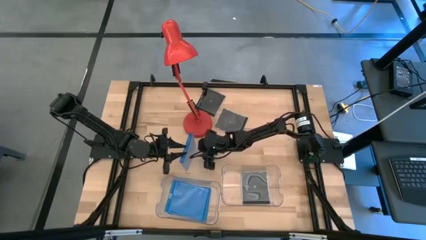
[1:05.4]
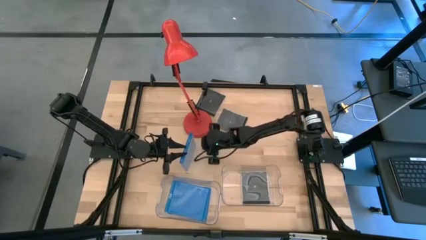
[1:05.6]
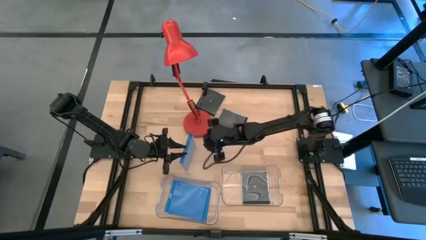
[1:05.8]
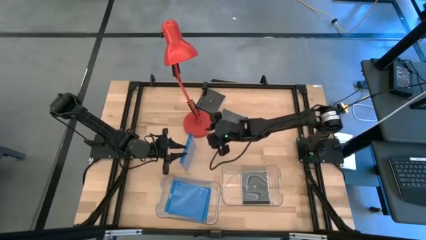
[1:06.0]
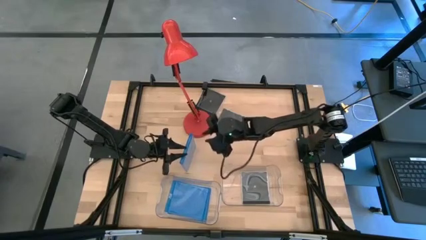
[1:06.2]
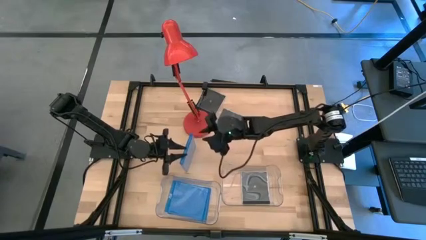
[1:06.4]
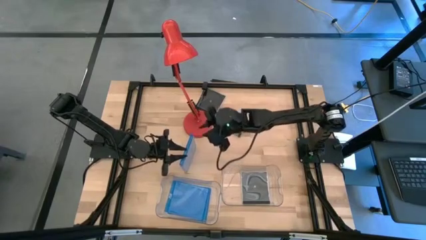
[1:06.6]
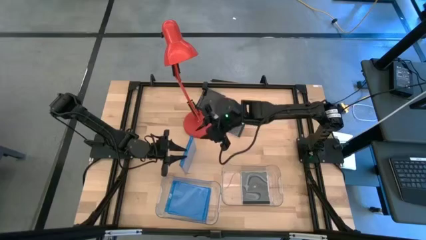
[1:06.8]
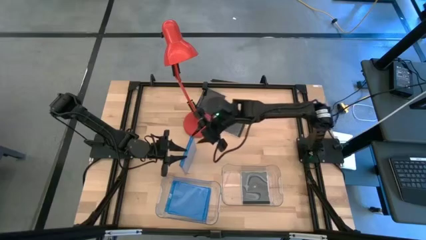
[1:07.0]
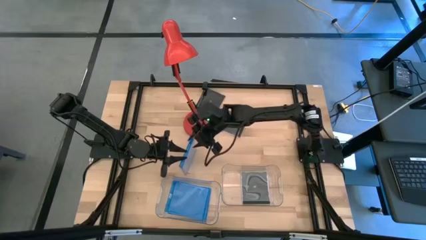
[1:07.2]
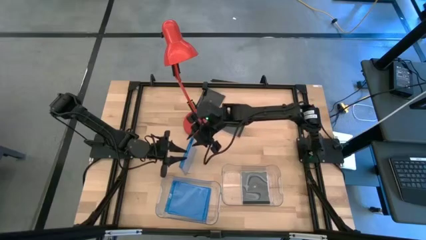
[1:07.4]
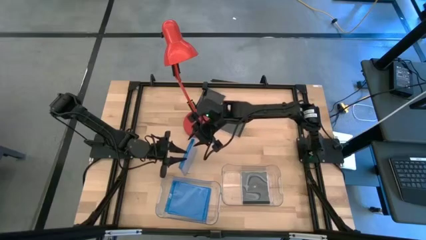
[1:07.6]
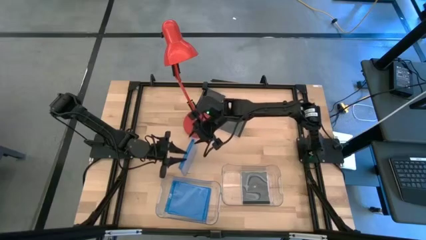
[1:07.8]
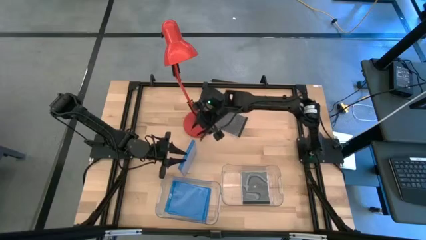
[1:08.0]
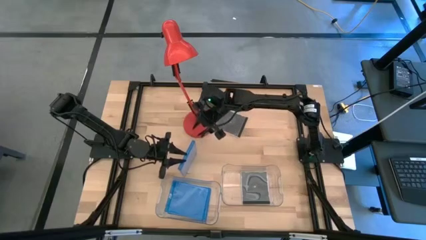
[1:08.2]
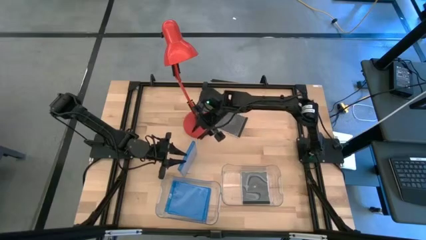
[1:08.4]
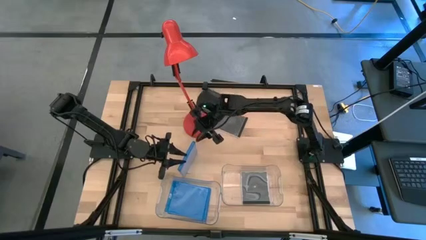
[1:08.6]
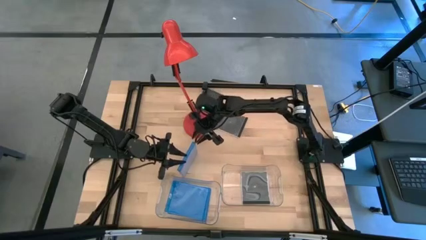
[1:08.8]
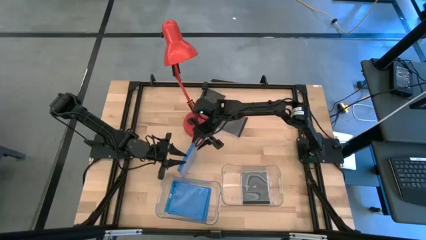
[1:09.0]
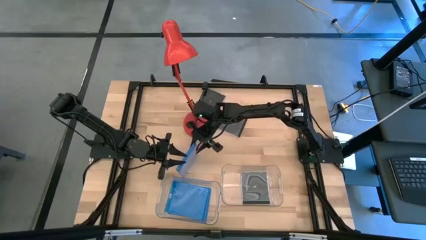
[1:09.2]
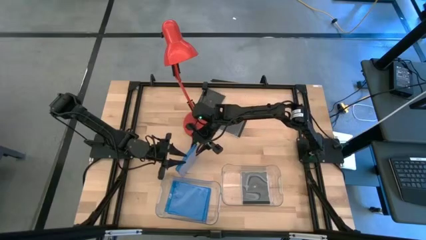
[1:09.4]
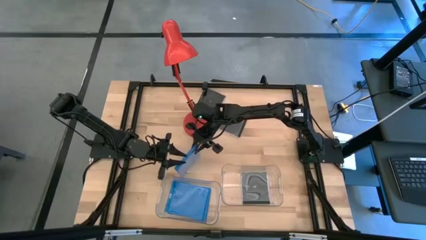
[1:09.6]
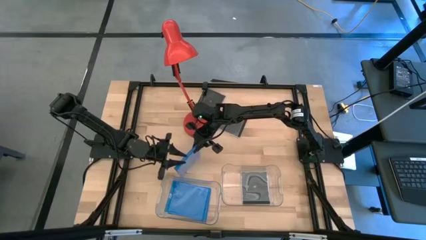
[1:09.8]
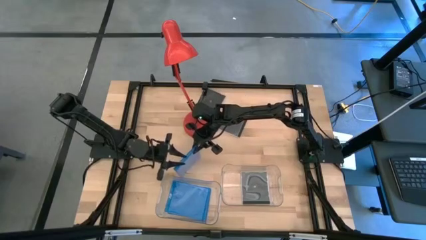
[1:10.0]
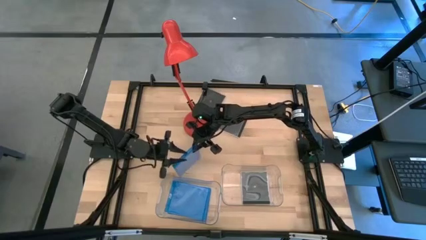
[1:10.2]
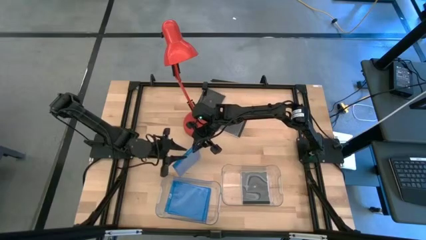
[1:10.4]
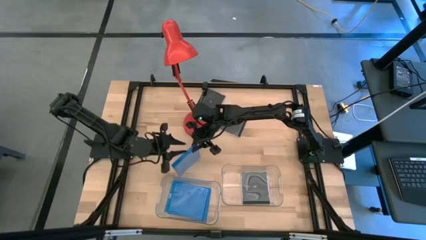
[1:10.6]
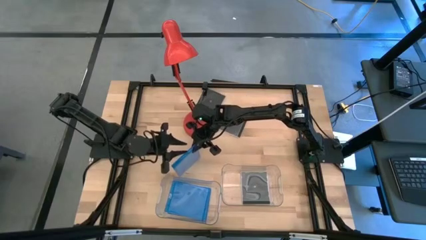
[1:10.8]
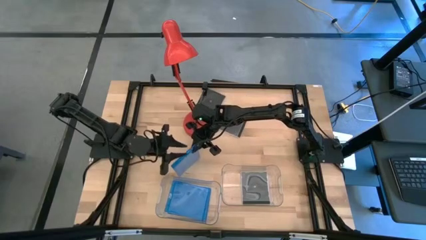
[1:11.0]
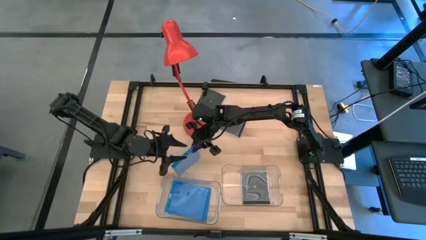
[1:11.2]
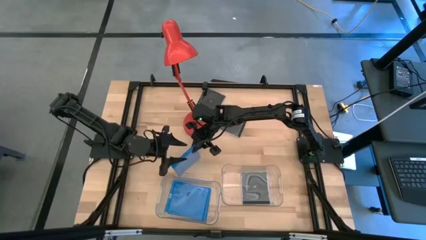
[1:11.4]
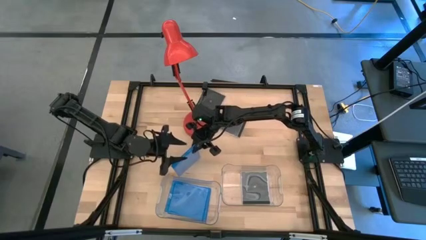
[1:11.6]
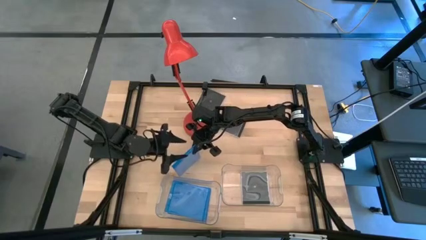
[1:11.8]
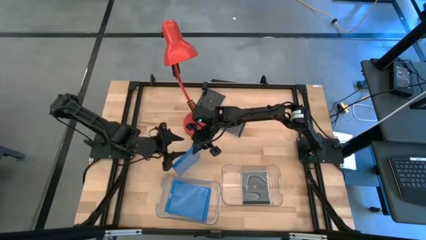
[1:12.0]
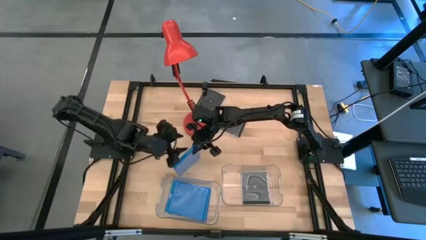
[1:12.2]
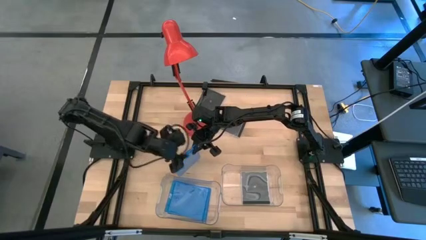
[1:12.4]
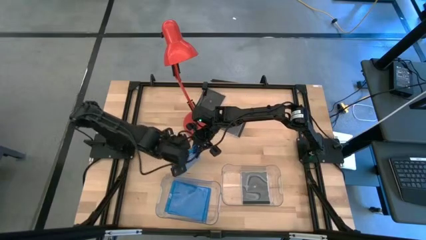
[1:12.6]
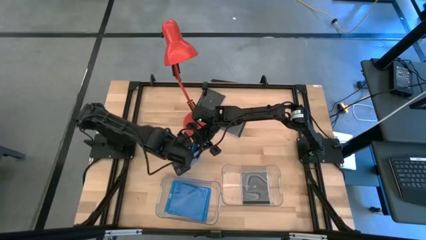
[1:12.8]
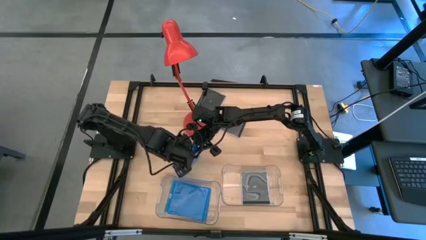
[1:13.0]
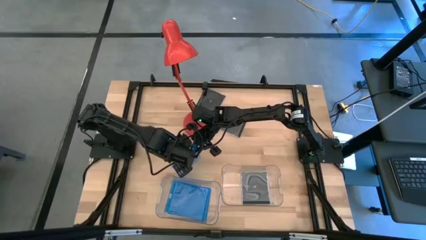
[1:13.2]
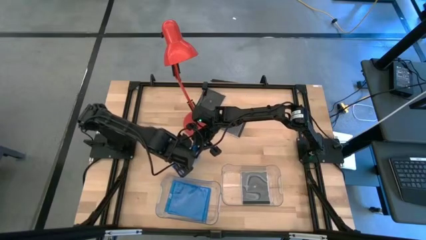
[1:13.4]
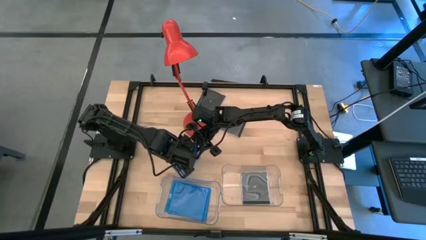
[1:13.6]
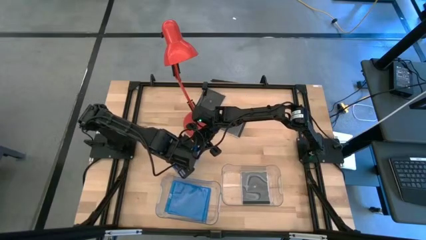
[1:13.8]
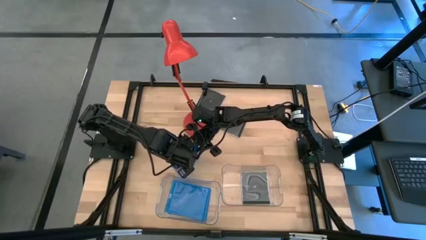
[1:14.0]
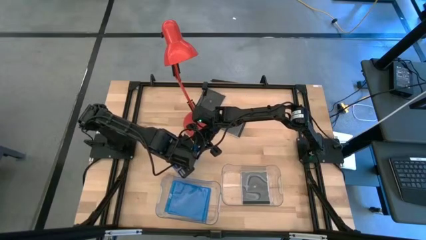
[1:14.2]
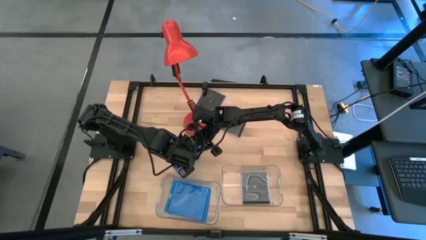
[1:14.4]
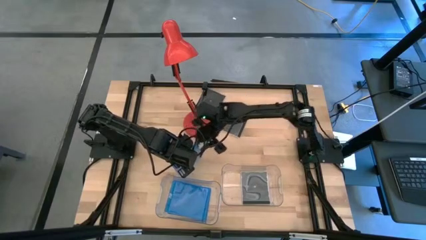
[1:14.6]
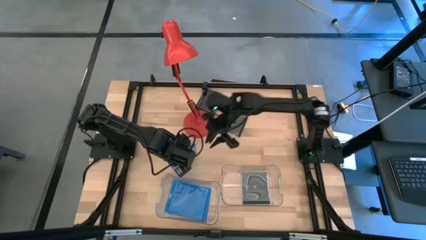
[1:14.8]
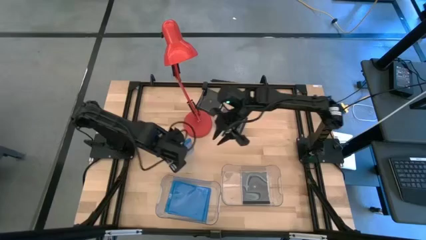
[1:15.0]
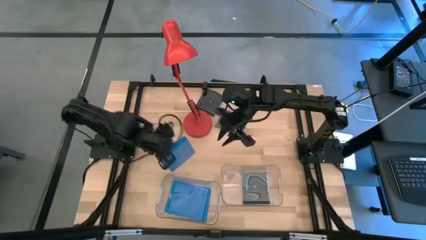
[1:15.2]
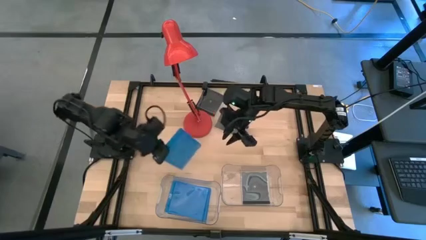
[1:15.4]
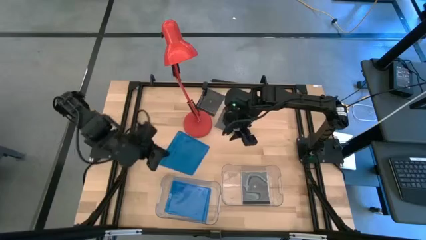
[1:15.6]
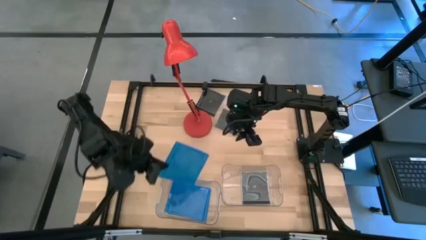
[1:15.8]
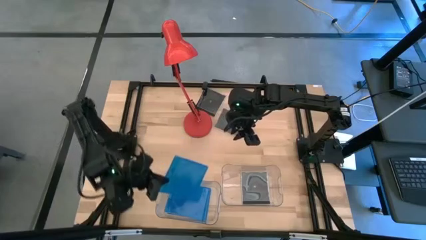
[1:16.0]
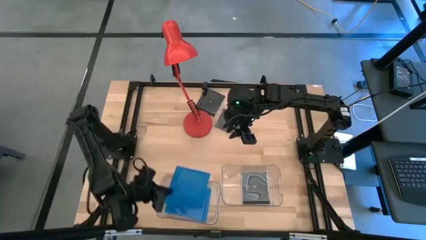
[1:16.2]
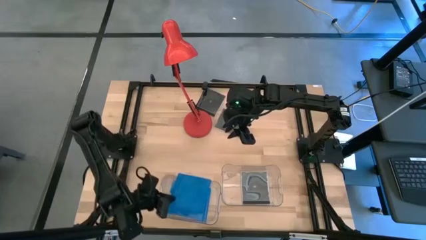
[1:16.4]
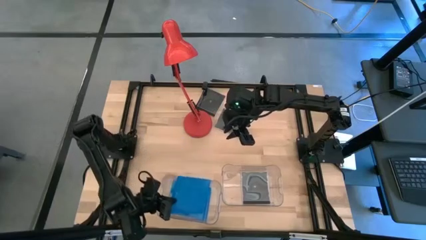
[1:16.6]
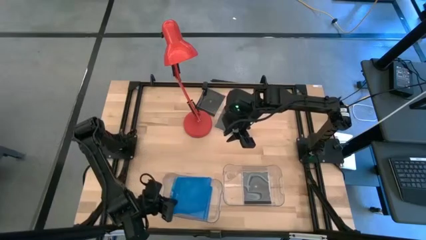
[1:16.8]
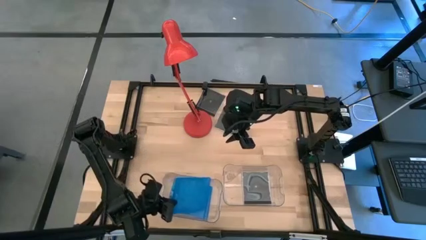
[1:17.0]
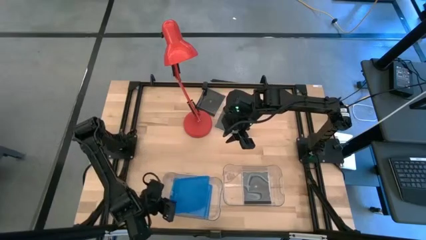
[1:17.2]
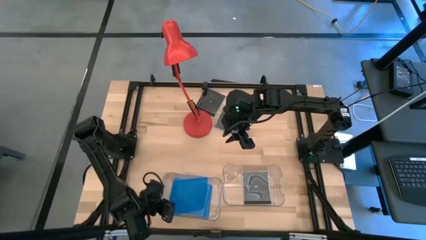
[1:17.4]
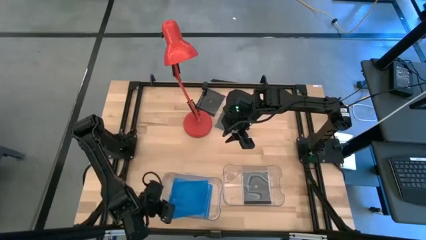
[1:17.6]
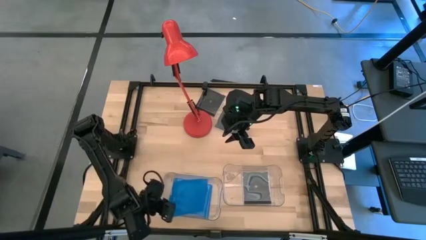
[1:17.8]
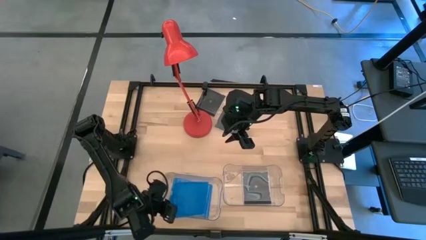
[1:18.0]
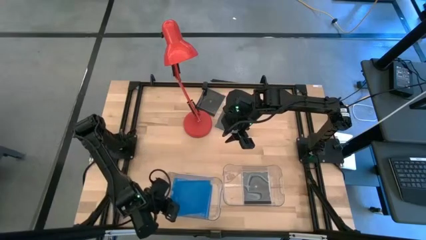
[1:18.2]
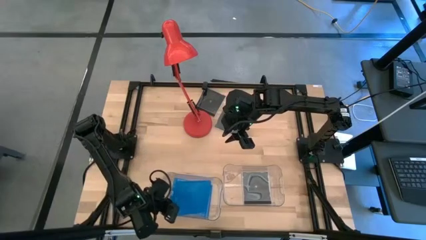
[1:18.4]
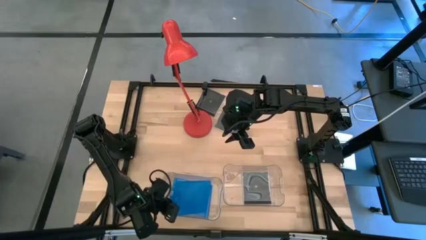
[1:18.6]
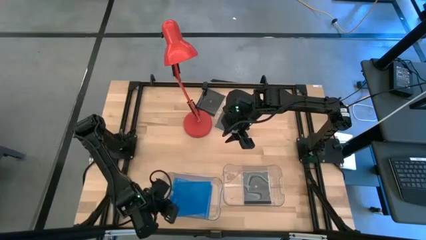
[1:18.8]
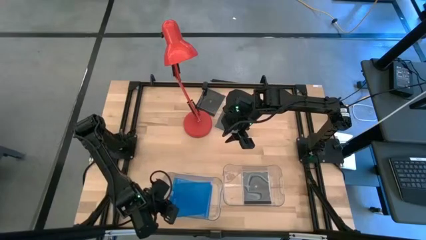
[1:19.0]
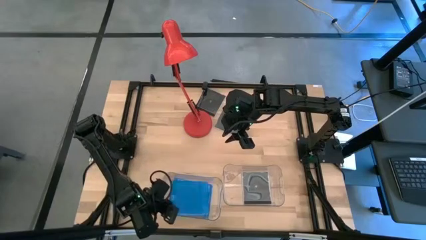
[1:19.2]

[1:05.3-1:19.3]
Task: Pick & place jewel cases by type
Put the blue cd case into the left transparent bin
